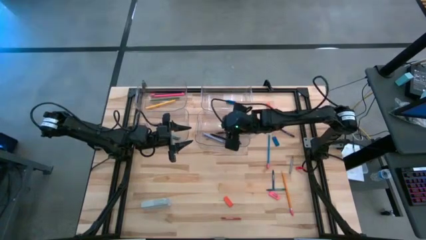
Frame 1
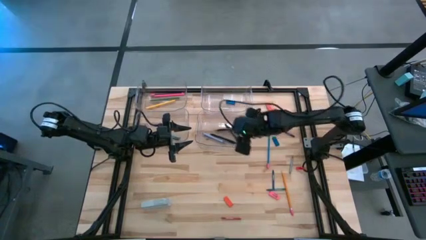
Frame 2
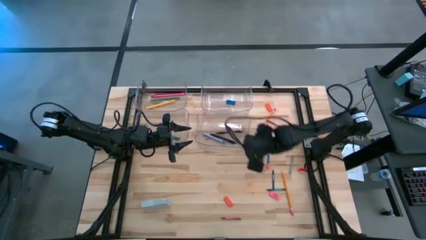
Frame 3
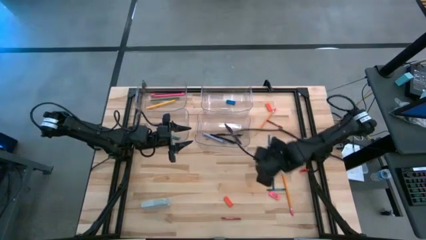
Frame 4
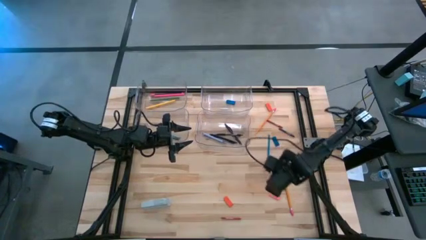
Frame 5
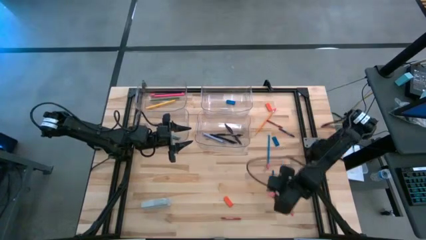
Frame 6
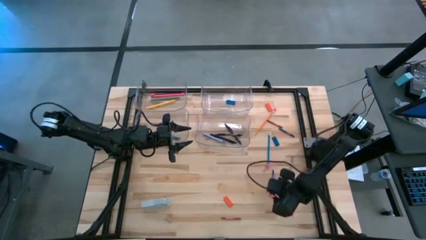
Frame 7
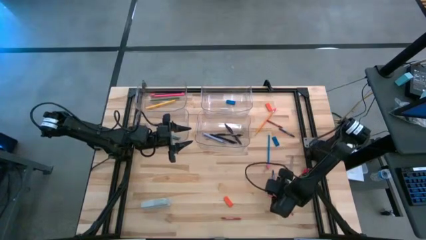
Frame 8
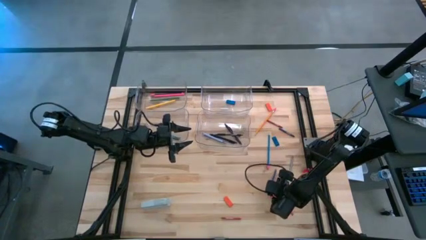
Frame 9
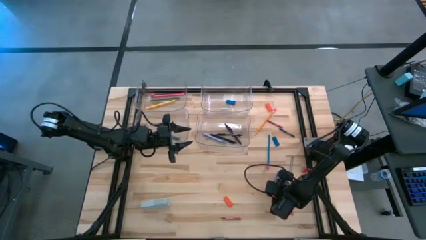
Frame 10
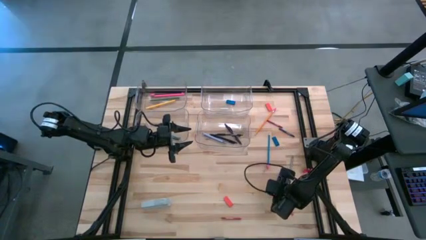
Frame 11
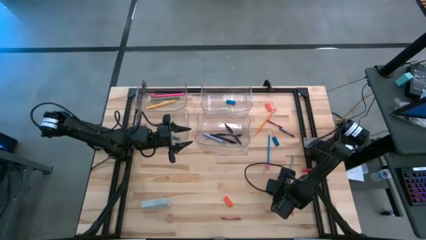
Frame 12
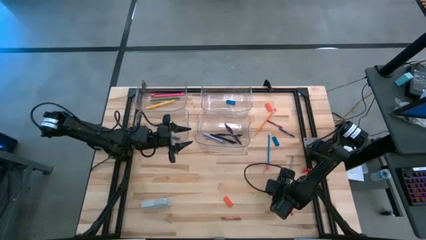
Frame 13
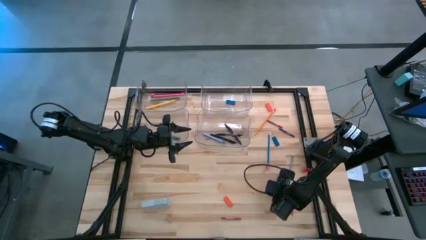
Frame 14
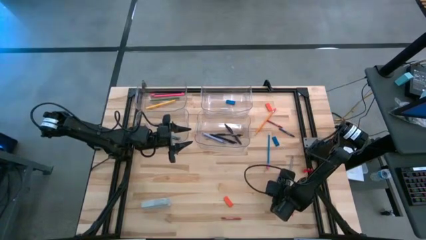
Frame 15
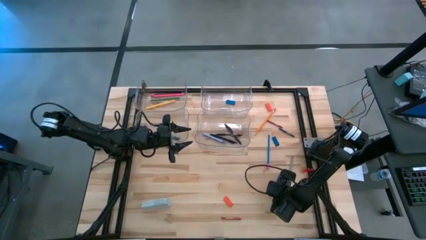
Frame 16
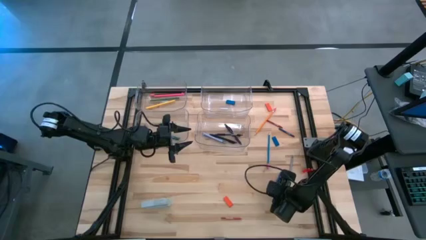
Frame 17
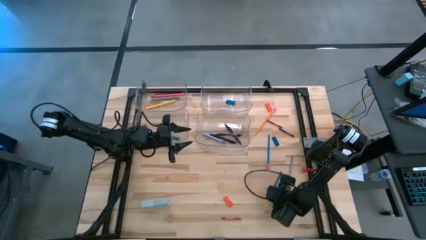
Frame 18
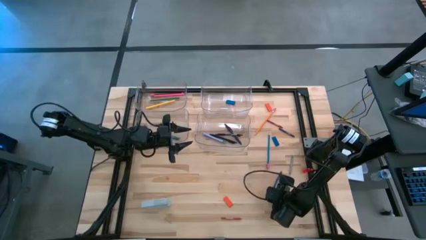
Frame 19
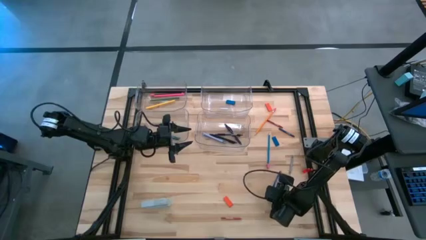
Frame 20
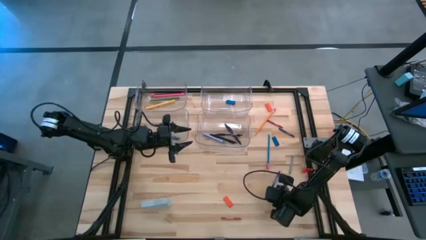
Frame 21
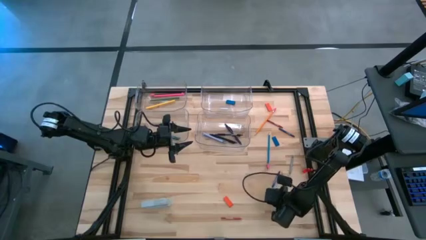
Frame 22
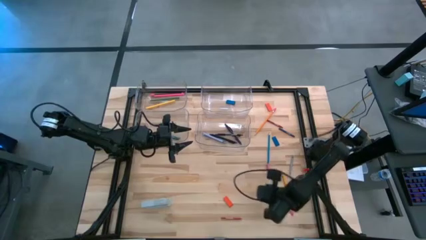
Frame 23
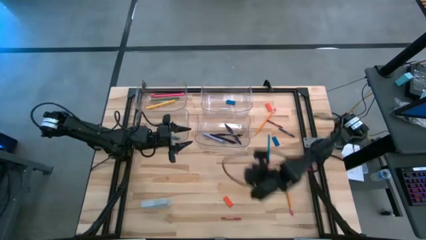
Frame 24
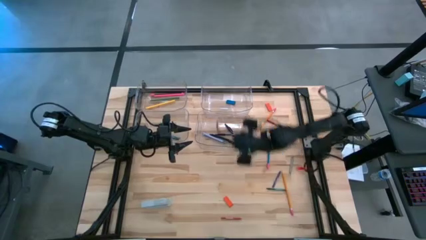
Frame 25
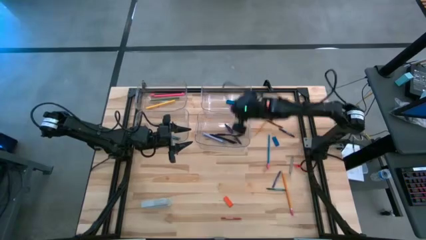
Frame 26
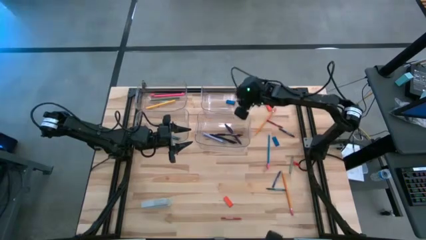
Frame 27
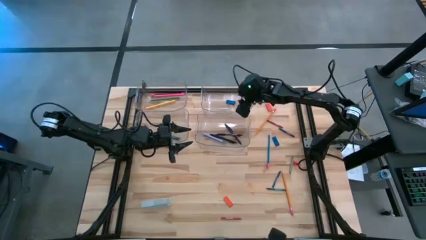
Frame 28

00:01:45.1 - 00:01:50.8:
Task: Sort crayons/erasers/pens/pencils in bins
Put the pink eraser into the top right transparent bin

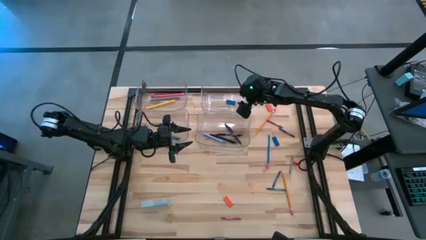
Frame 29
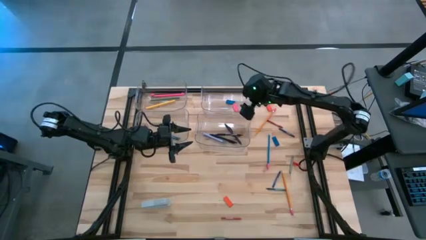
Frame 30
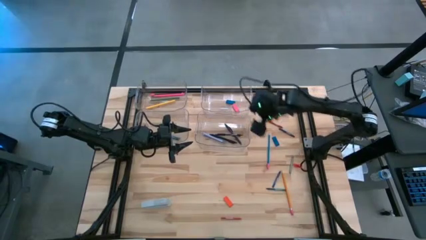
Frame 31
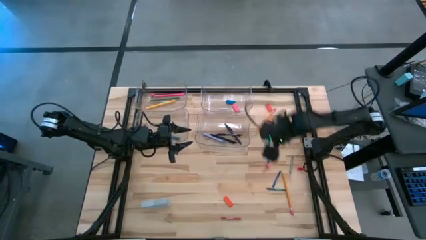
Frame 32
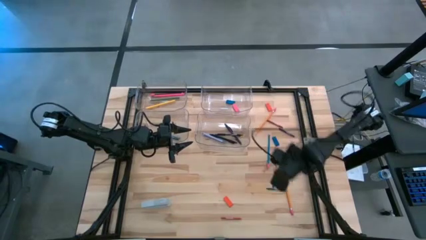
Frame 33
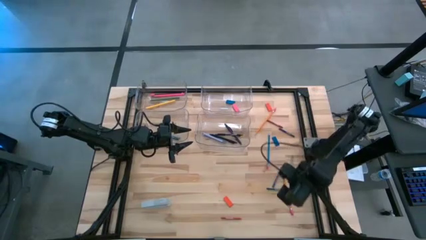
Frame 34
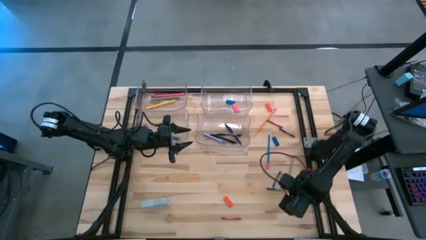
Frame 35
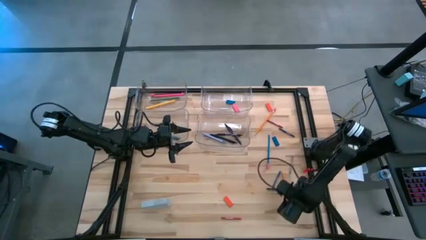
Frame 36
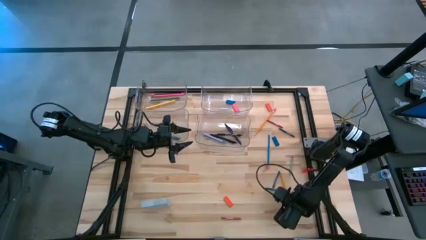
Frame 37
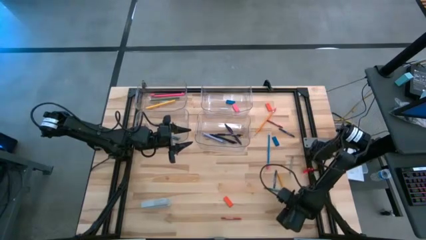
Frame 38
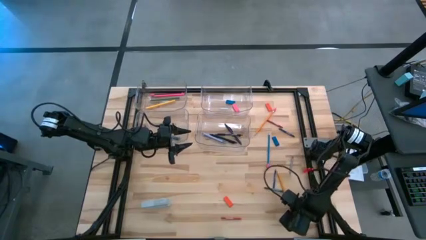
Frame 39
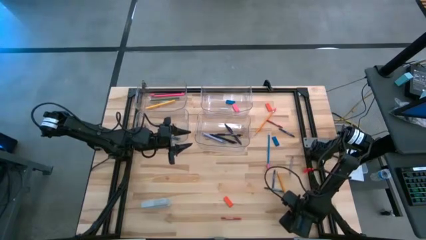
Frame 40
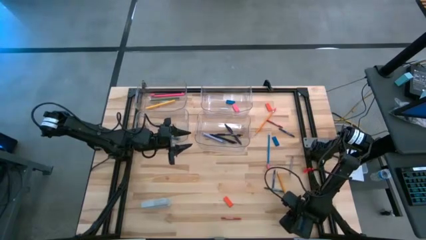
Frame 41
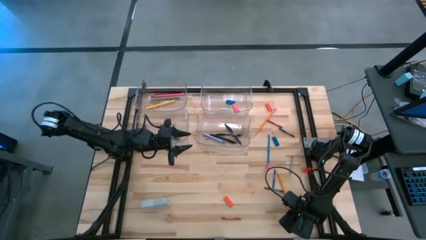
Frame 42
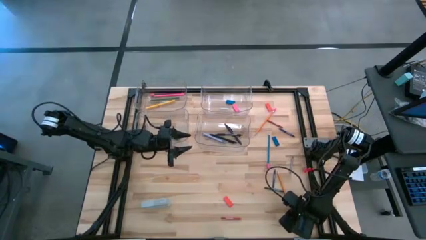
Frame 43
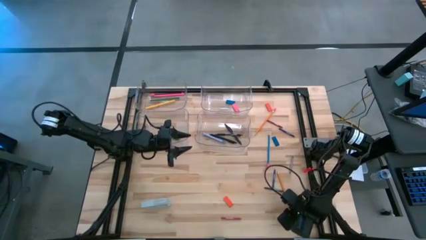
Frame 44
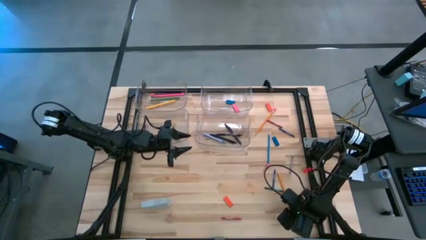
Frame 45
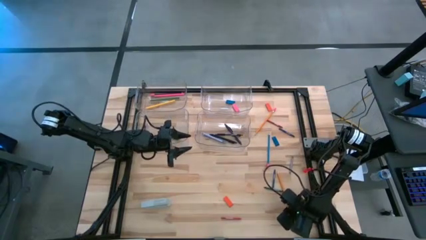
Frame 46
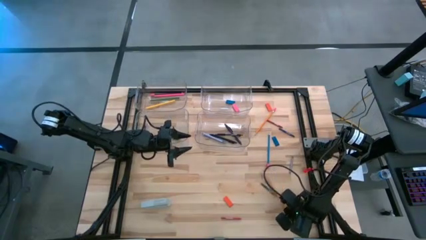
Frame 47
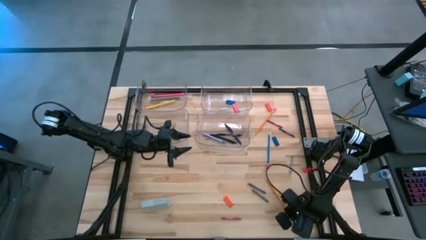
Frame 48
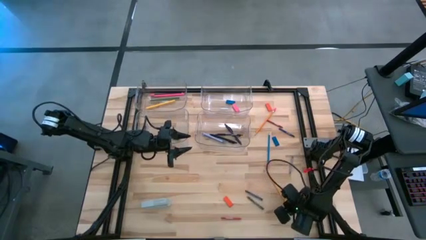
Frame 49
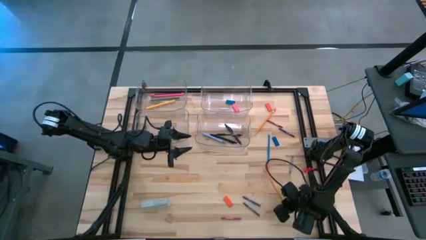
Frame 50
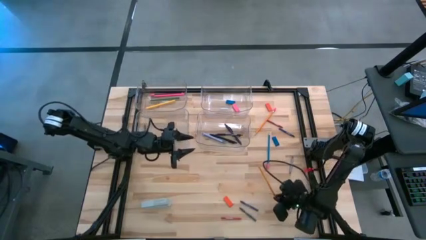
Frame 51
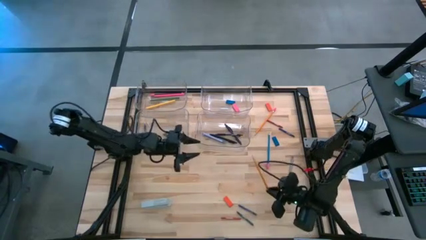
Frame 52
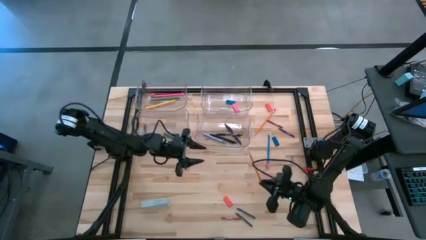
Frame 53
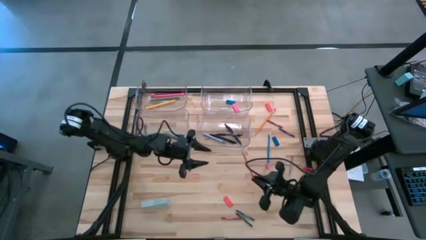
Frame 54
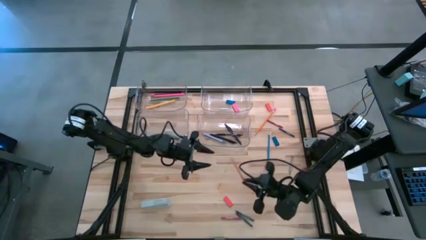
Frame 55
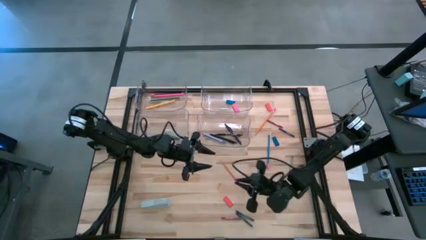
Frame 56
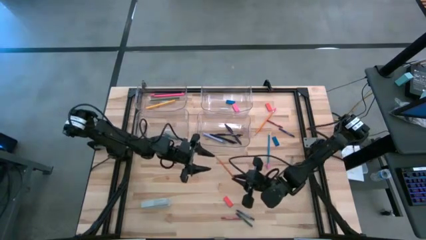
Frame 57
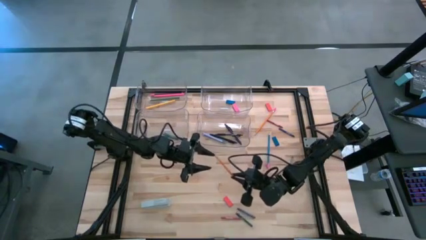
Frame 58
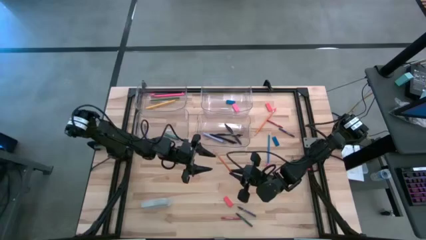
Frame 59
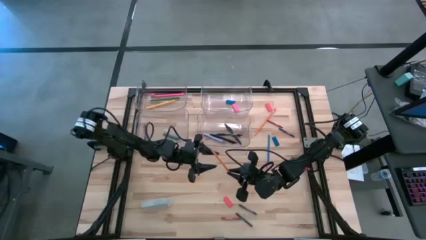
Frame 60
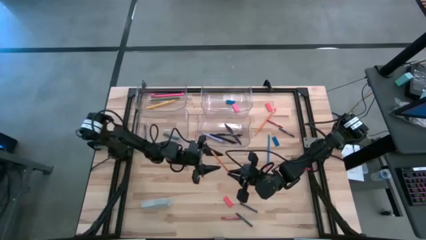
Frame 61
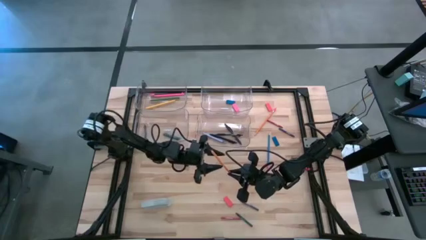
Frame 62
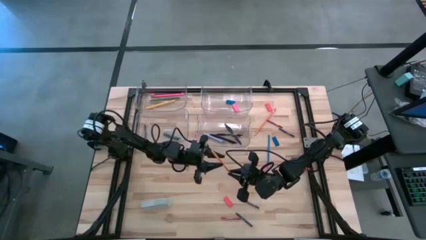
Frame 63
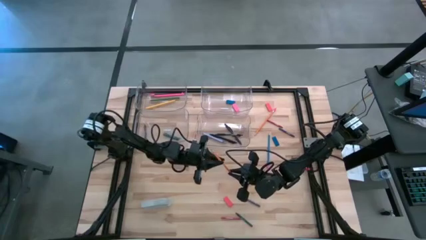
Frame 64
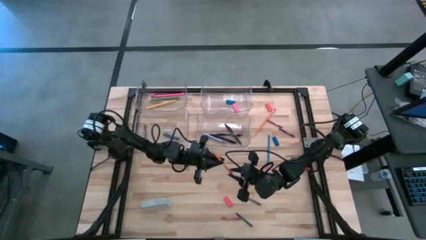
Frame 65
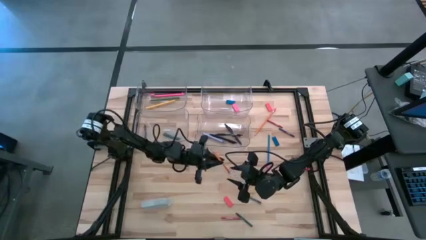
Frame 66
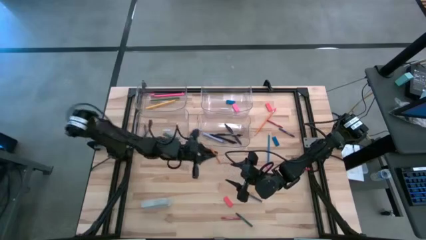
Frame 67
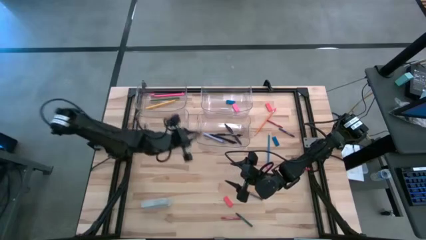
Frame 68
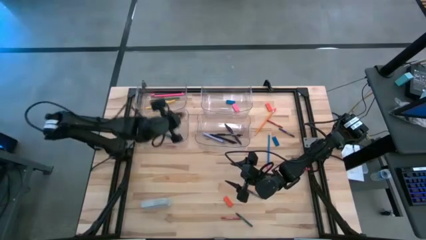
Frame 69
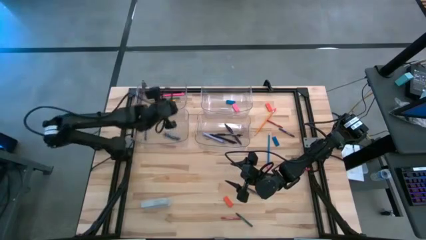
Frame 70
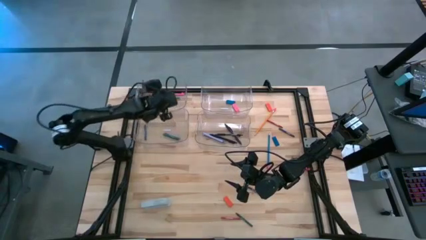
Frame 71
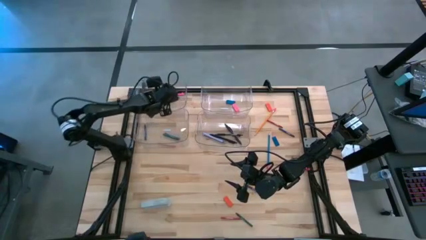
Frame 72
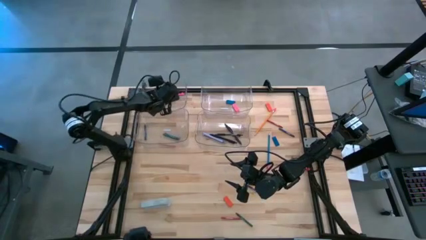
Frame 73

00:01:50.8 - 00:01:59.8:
Put the bottom orange pencil into the top left transparent bin
